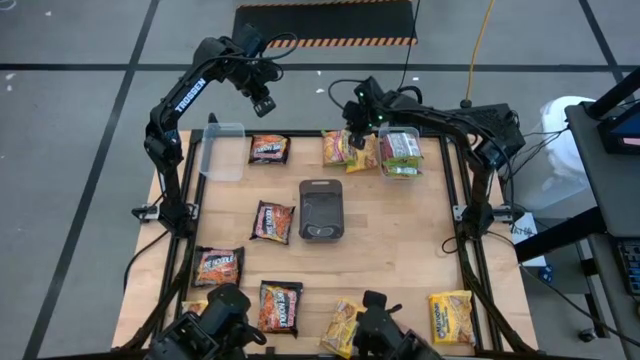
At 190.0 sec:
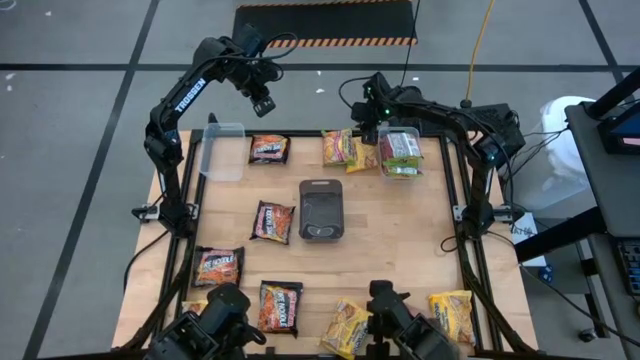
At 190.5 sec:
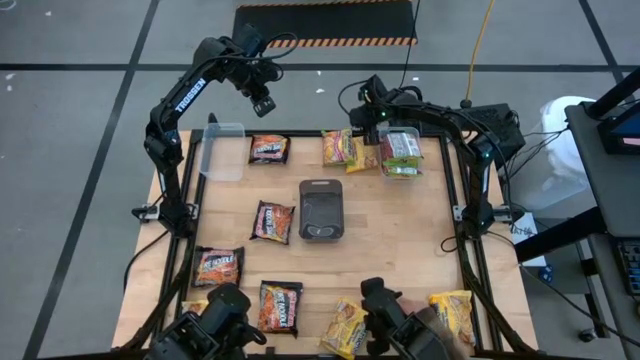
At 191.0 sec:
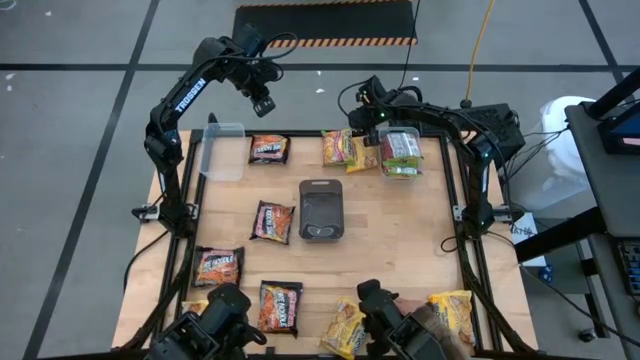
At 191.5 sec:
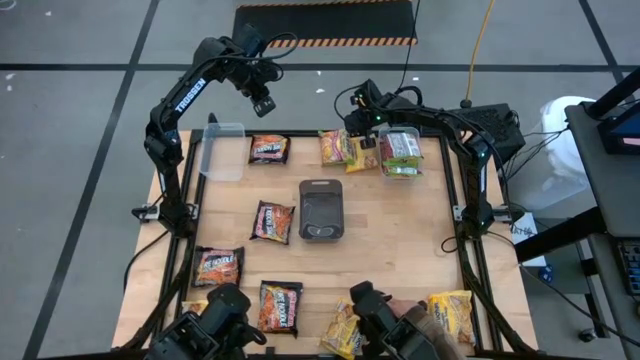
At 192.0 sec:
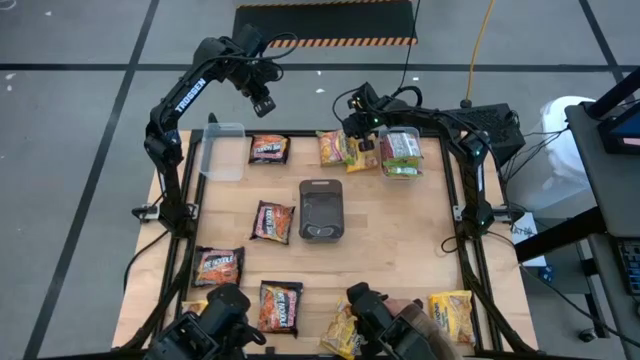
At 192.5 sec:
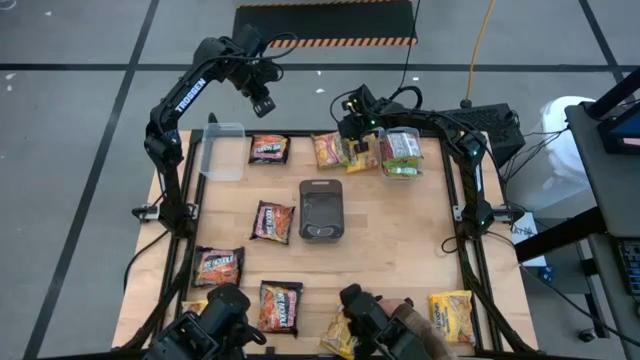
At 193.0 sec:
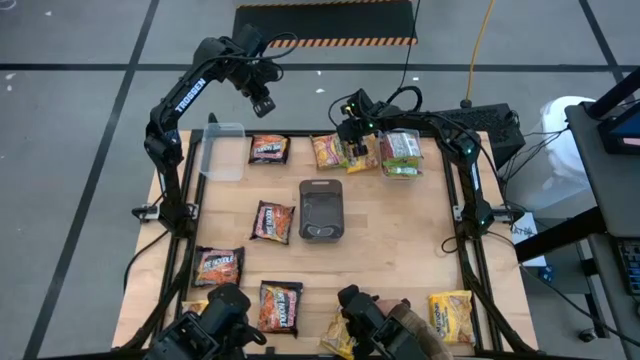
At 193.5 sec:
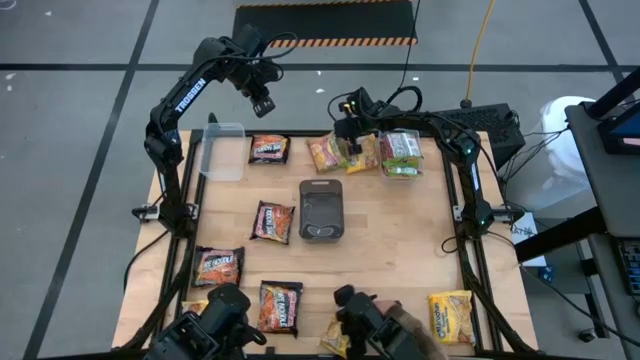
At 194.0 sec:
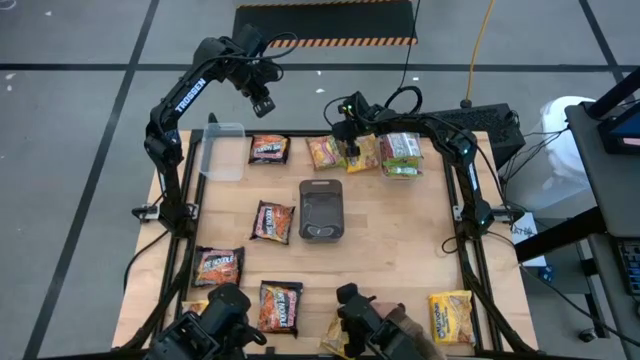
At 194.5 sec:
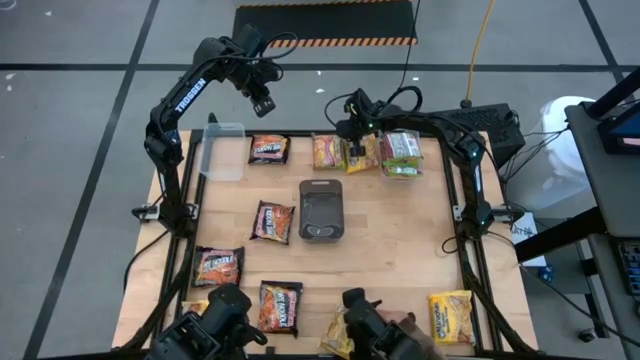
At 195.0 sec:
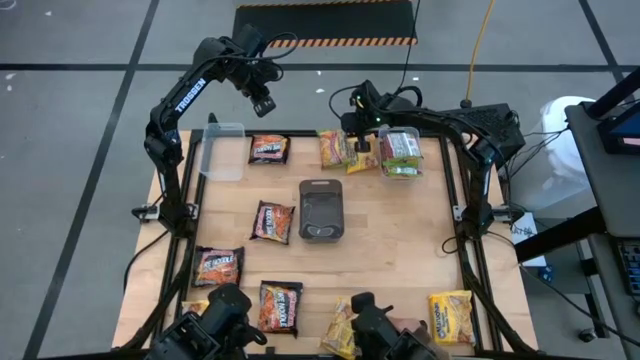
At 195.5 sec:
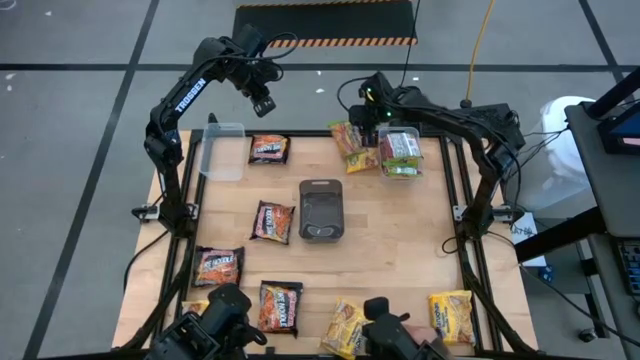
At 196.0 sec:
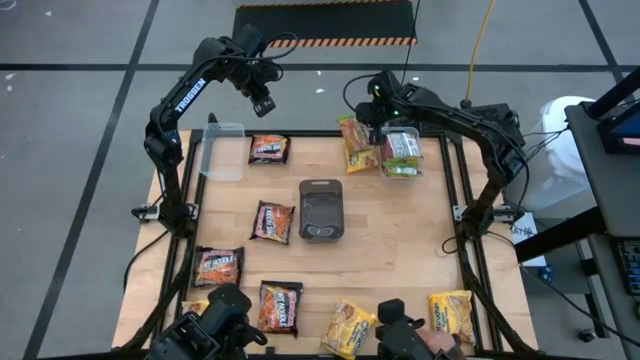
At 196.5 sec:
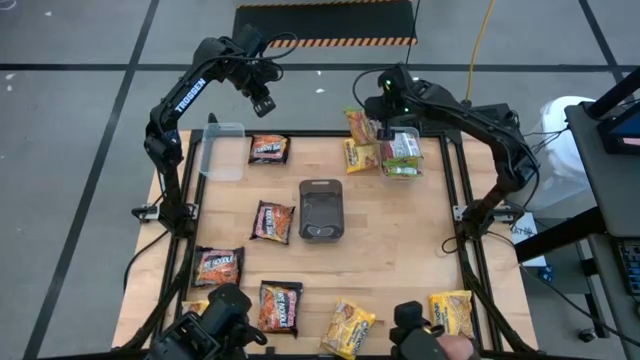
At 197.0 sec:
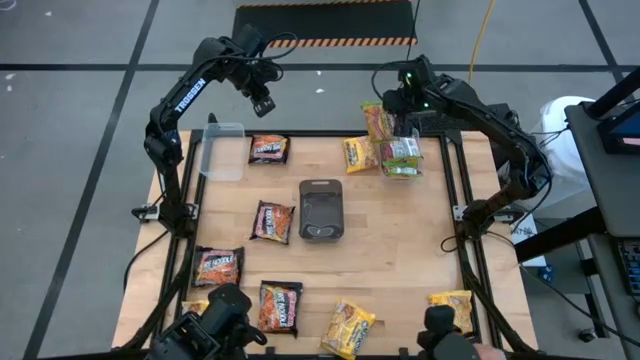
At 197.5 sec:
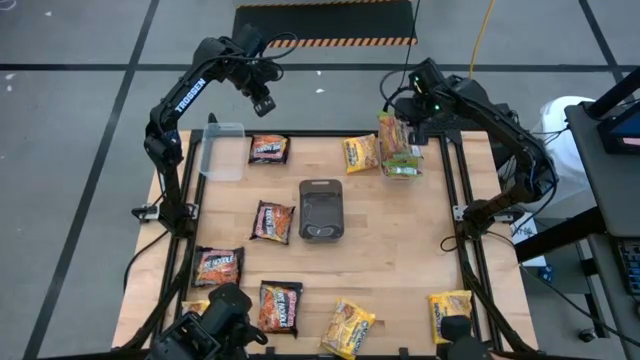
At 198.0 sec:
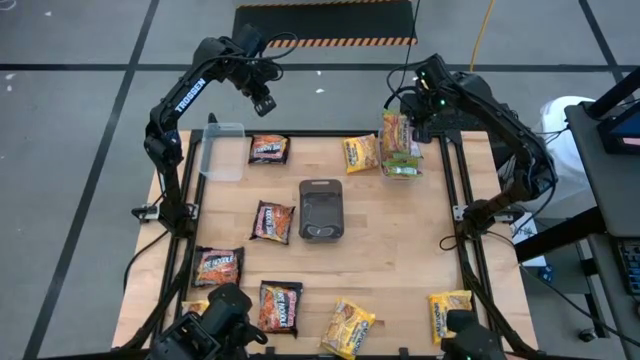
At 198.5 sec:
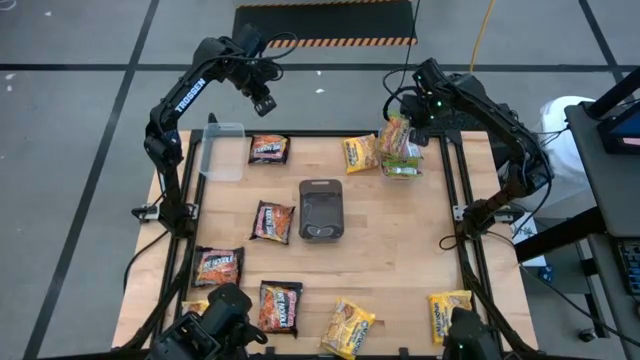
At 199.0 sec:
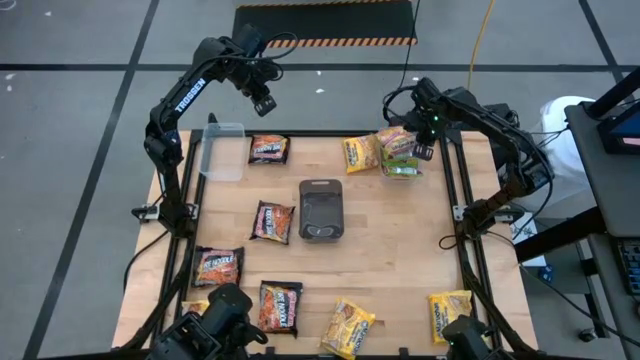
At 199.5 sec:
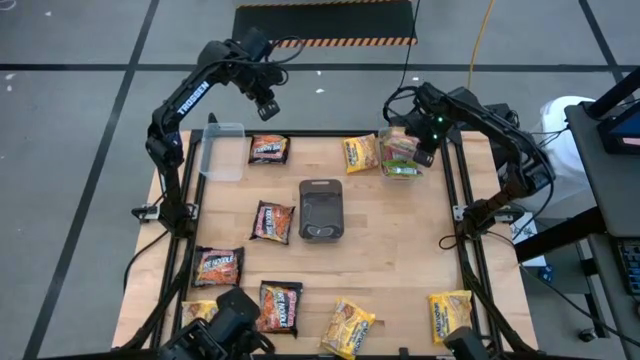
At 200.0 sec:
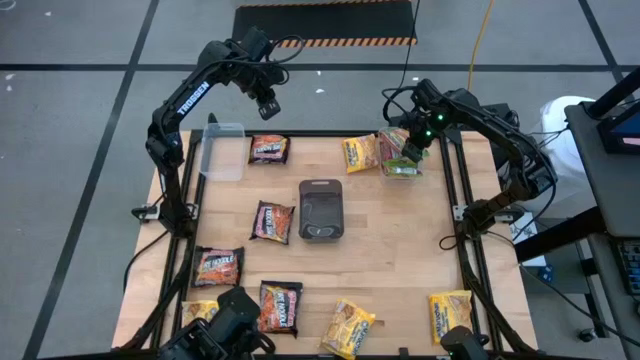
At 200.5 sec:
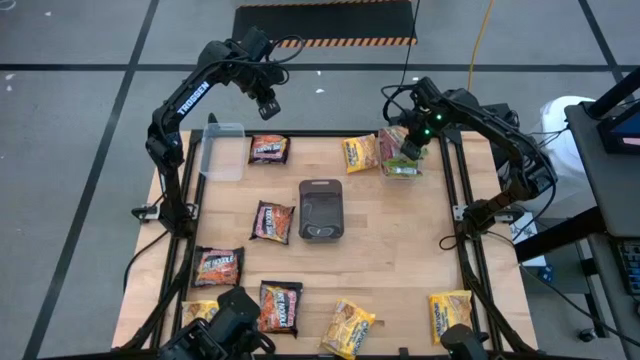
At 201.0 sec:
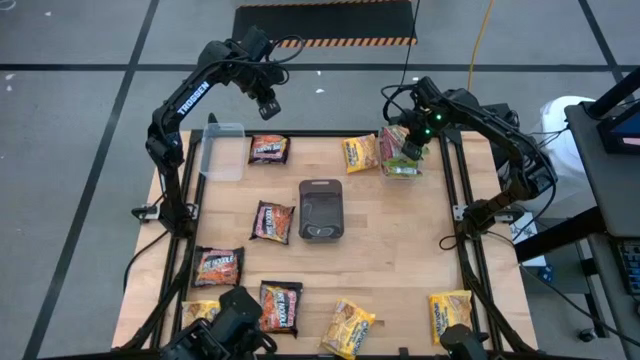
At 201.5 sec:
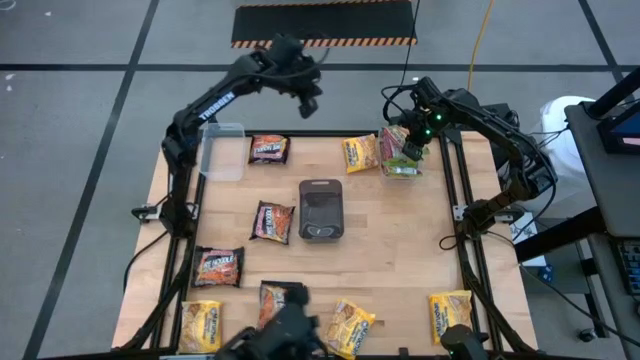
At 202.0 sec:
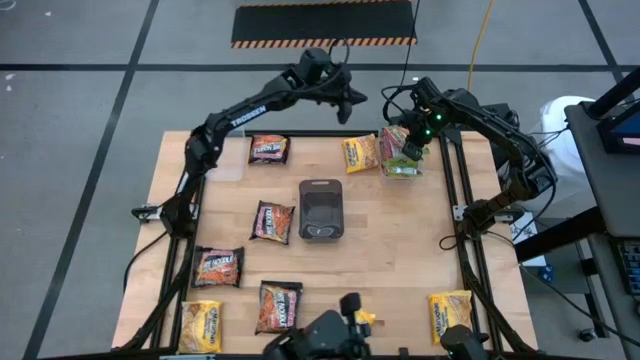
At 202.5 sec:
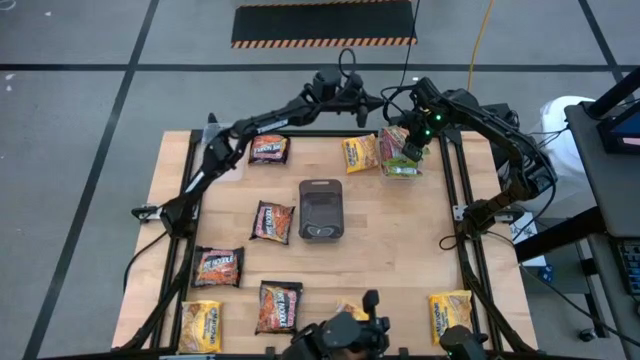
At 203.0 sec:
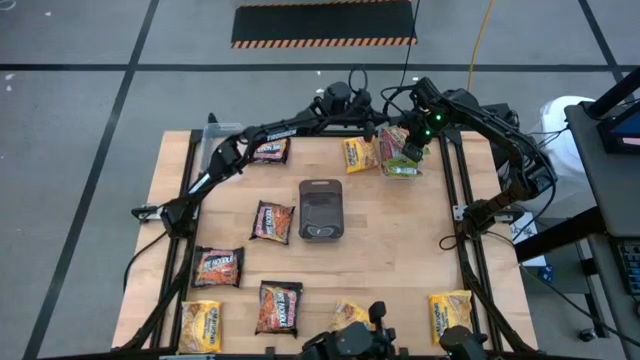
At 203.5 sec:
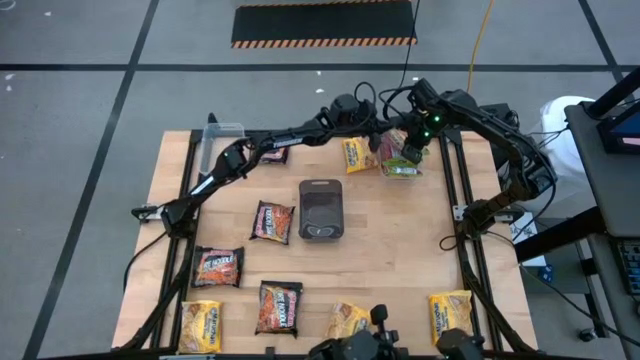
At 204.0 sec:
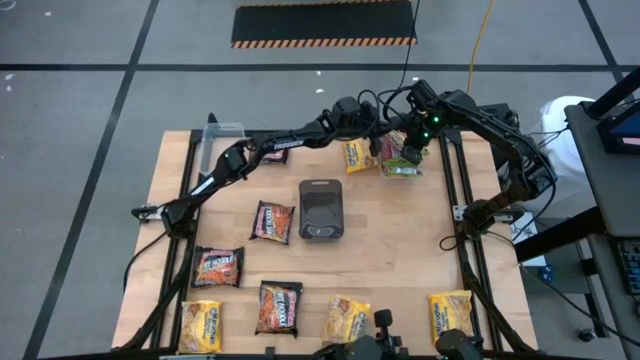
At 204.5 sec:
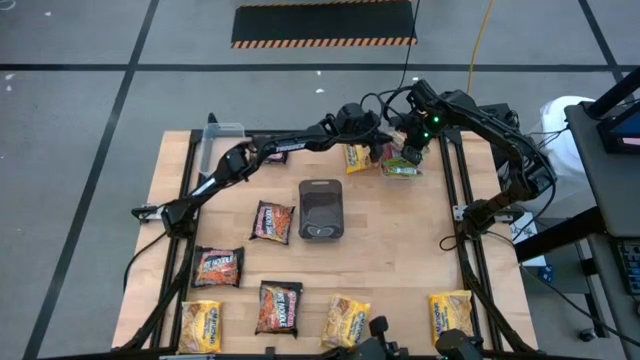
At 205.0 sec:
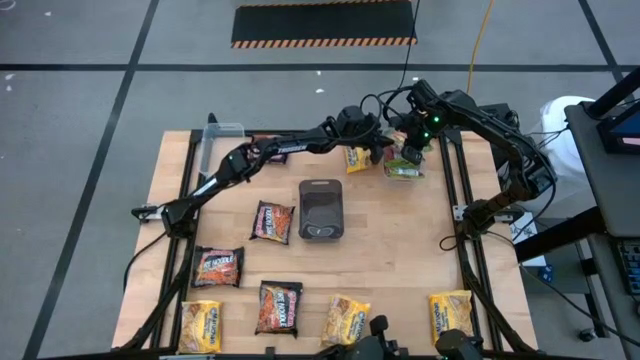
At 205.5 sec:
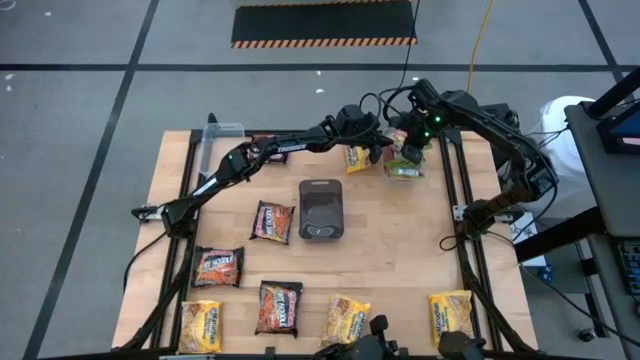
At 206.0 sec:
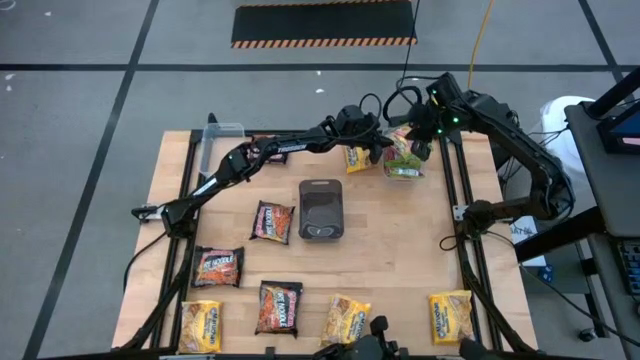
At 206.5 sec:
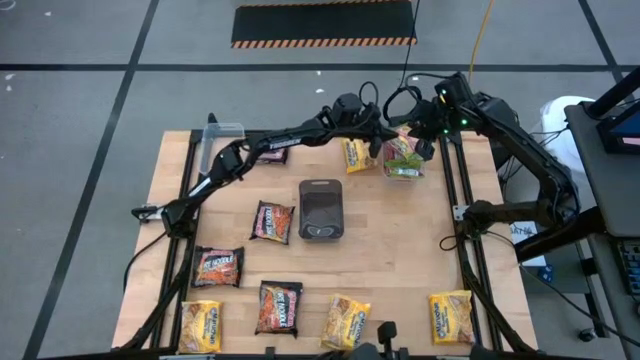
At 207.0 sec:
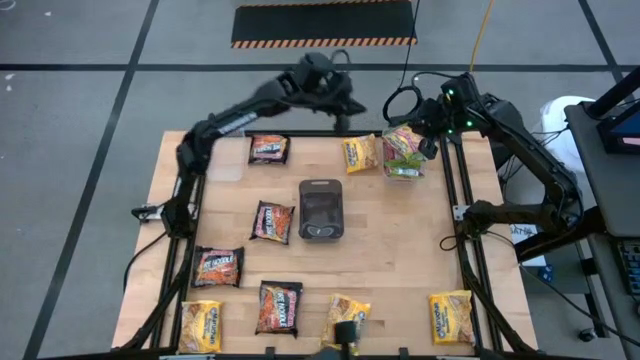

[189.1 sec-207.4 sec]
Task: Sort Maruchan noodles
Put the green noodle pack into the right transparent bin

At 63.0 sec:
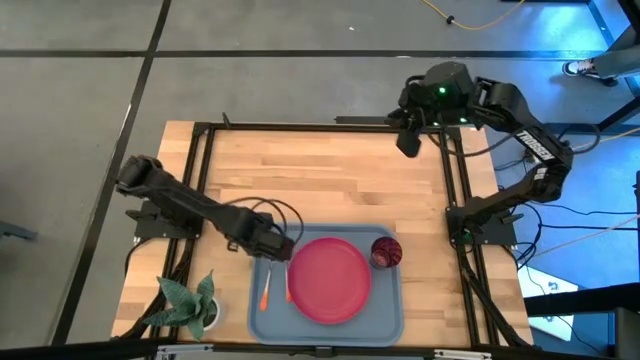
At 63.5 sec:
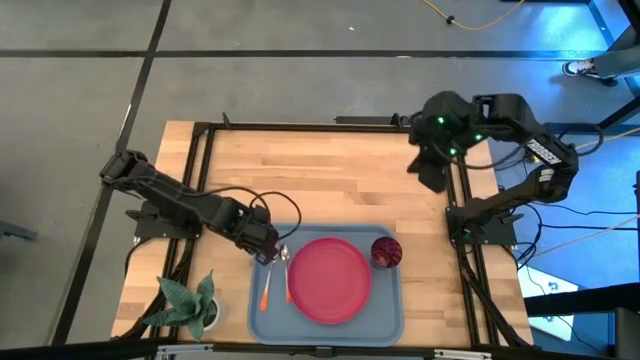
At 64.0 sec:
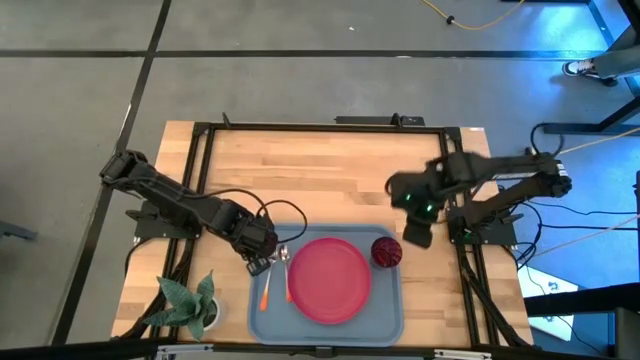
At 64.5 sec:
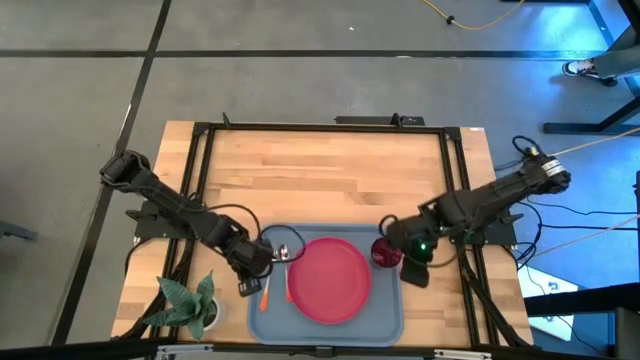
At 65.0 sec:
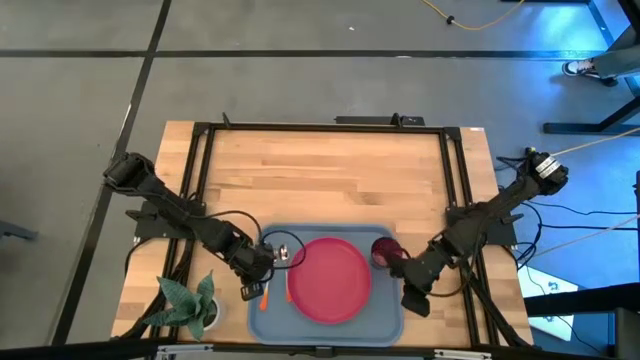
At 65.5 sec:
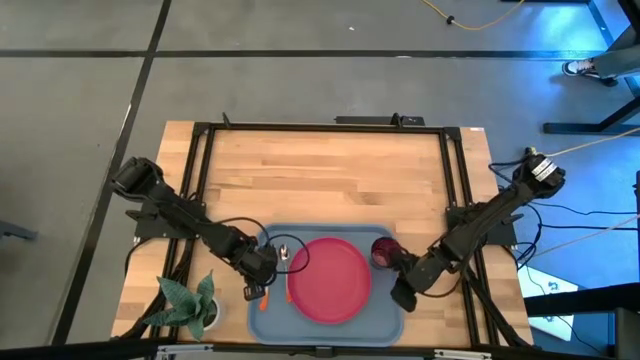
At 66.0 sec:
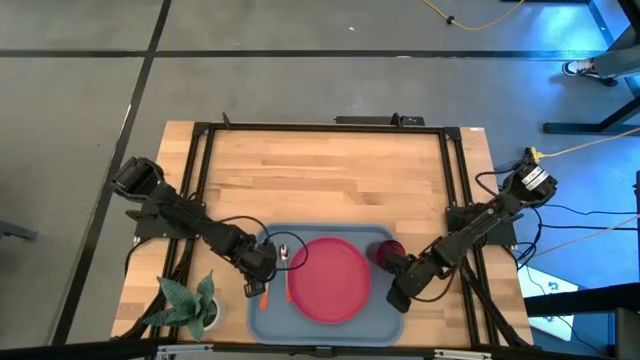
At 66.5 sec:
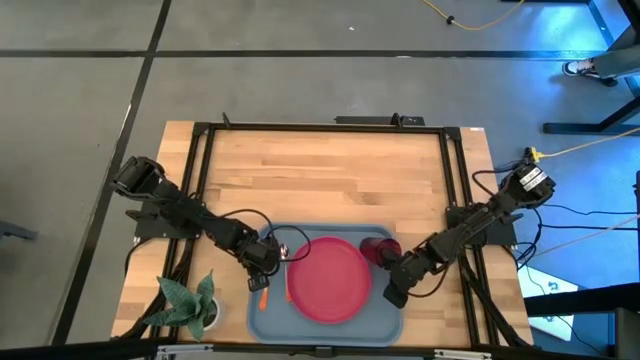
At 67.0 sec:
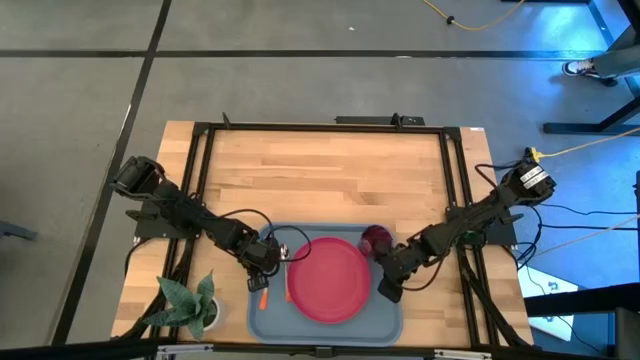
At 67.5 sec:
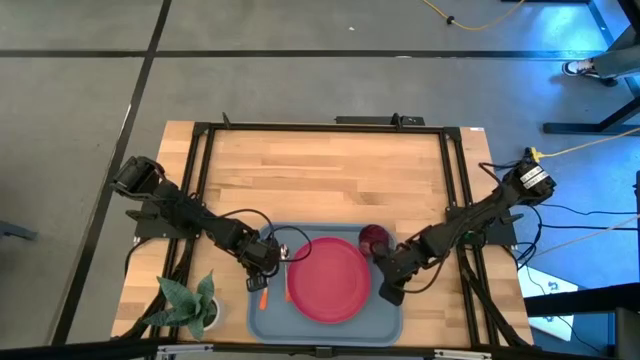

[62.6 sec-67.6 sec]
Task: Pick and place plate/cup/fork/spoon on tray
Adjust the red glass on the blue serving tray
